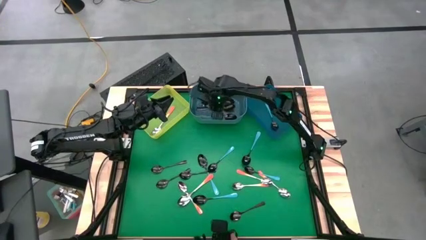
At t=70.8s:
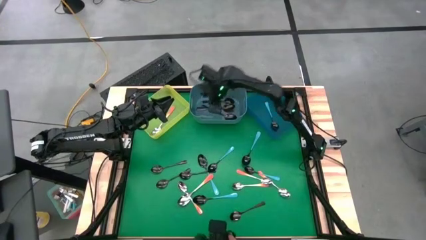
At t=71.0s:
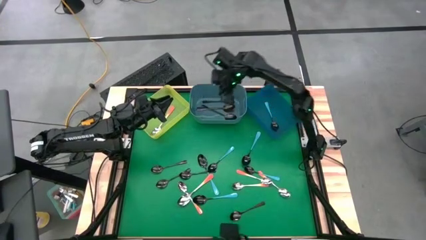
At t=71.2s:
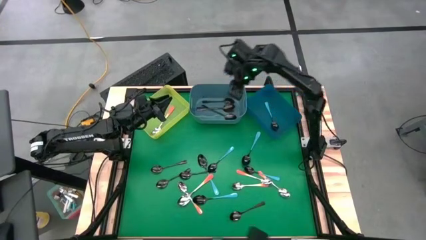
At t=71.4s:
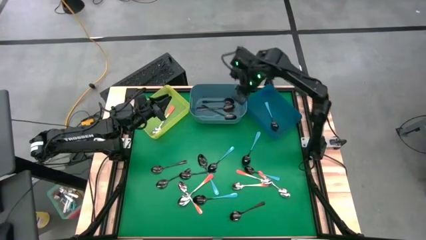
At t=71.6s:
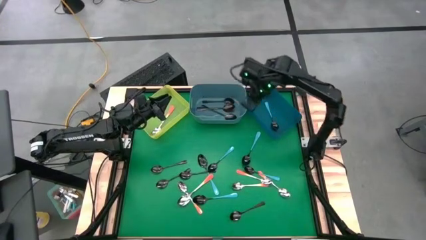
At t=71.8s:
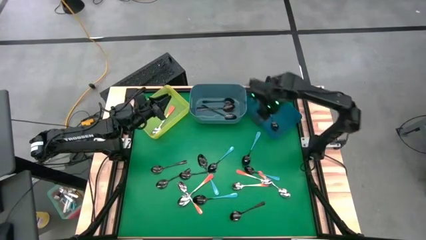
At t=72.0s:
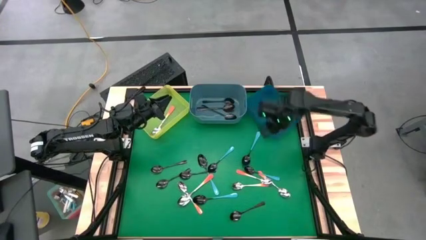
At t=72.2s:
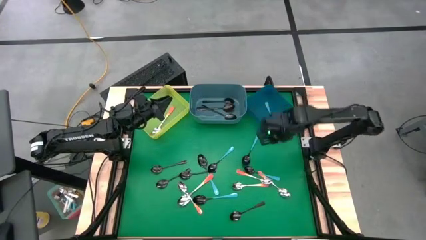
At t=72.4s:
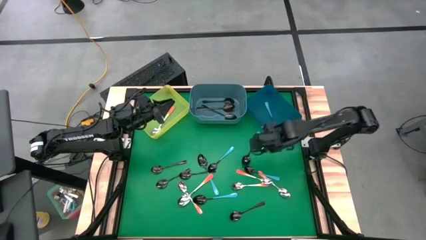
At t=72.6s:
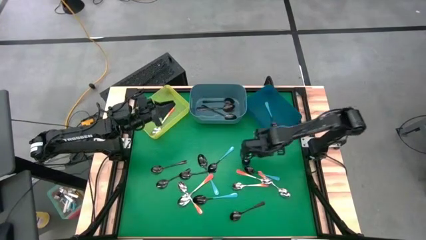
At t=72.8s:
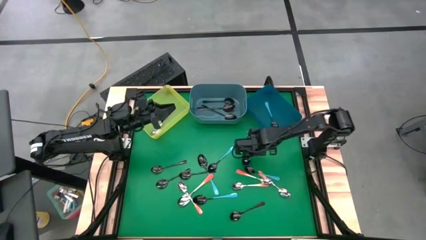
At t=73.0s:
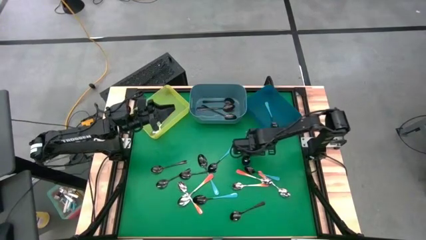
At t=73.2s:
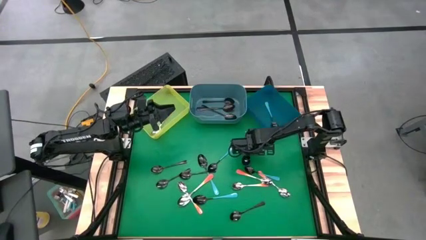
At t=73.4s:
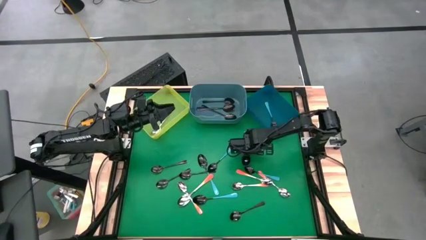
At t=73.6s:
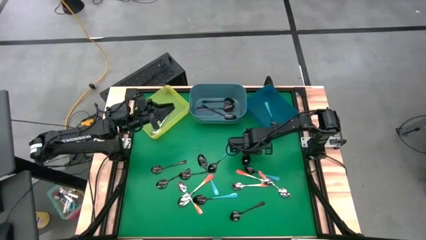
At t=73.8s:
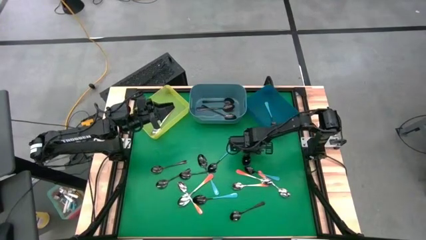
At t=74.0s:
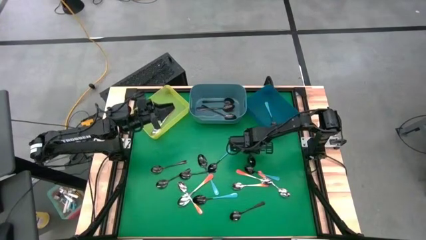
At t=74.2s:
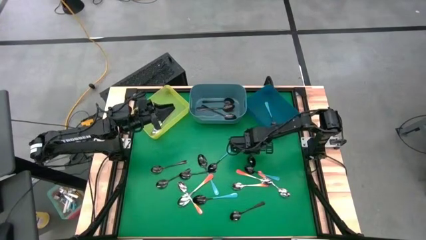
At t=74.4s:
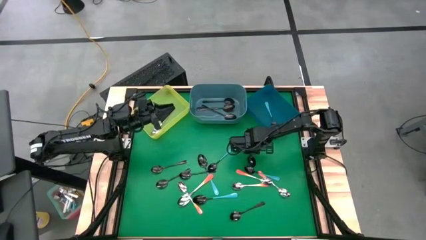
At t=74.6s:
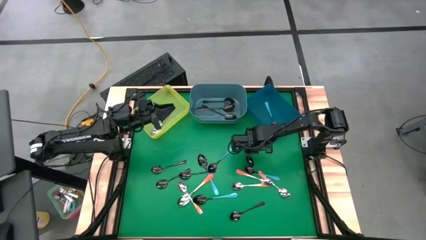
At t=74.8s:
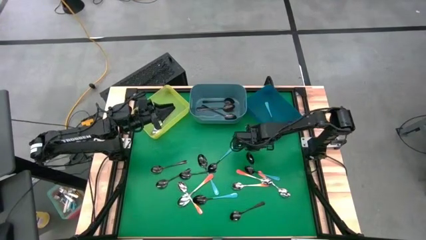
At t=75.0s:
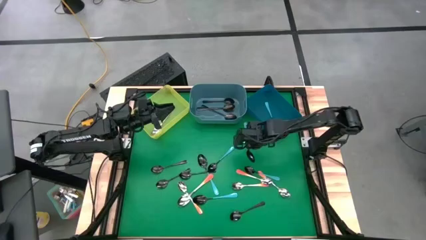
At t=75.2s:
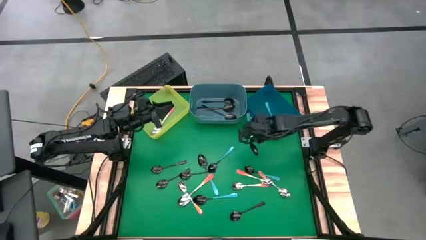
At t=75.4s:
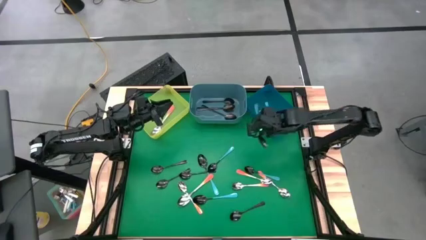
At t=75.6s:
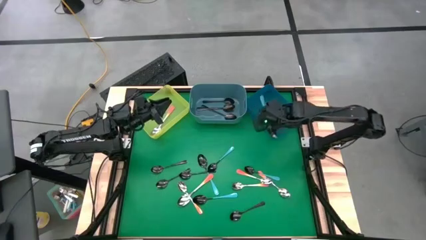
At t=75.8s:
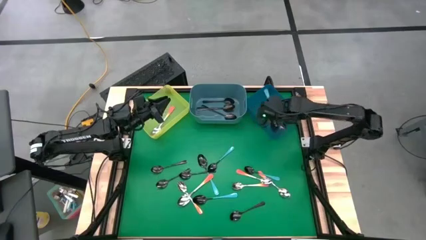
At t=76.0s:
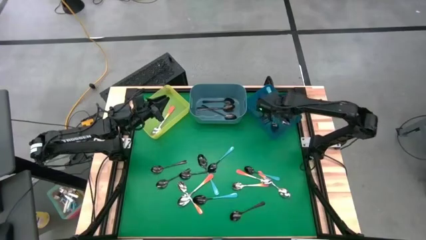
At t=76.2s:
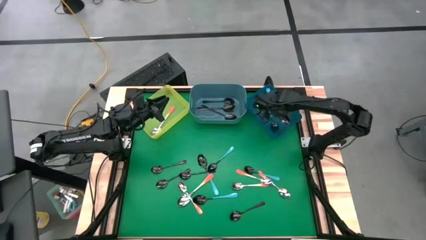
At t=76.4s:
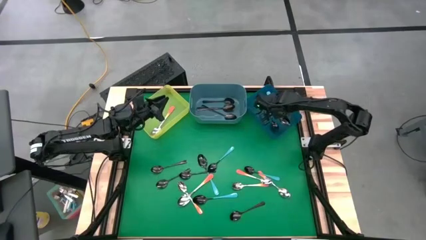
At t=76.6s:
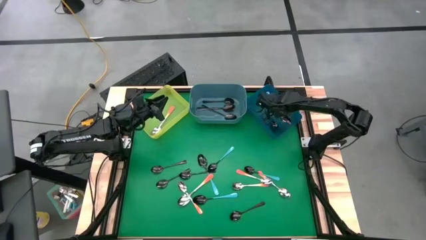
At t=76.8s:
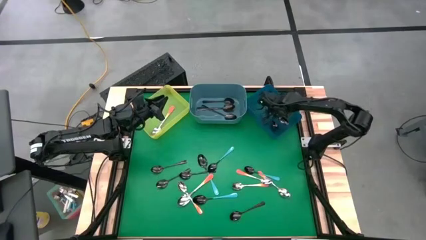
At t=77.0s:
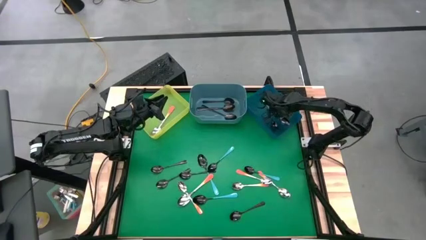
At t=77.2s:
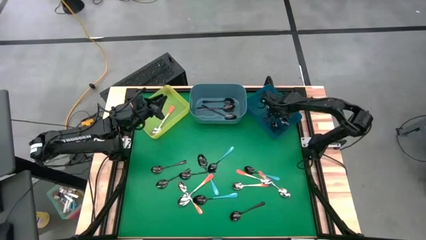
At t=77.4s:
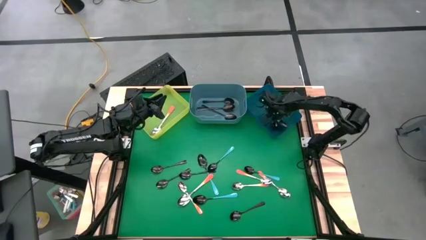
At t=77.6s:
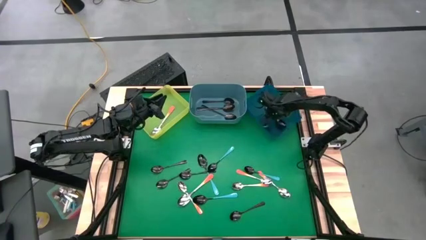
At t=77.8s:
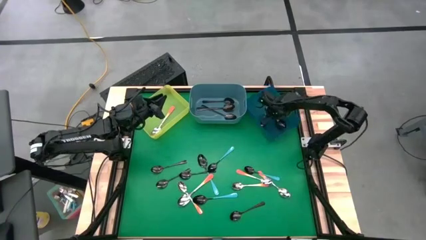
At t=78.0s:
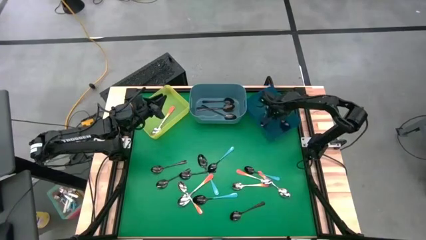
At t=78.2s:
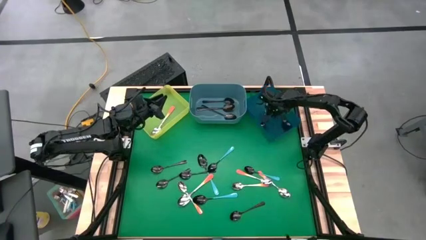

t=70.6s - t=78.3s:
Task: Sort silverware by color (type)
Put the blue spoon into the blue bin

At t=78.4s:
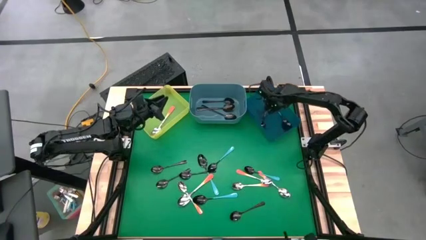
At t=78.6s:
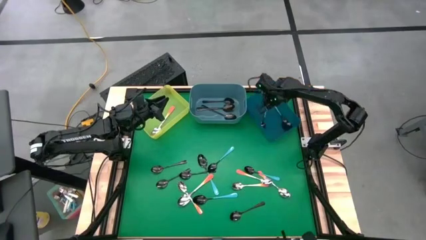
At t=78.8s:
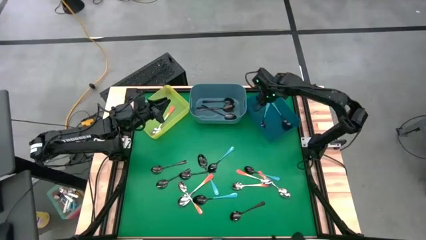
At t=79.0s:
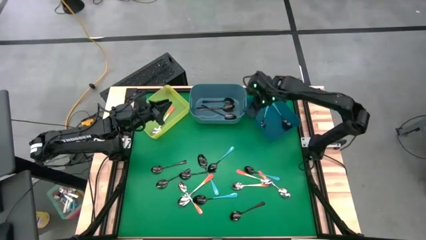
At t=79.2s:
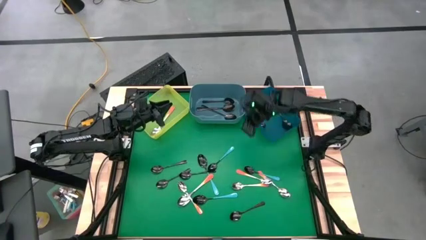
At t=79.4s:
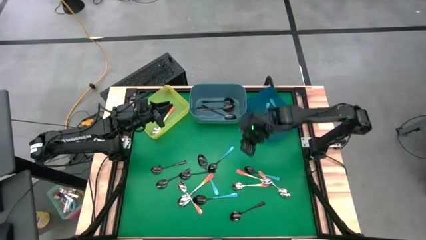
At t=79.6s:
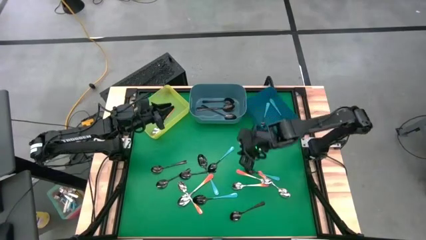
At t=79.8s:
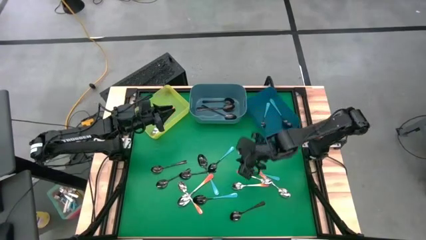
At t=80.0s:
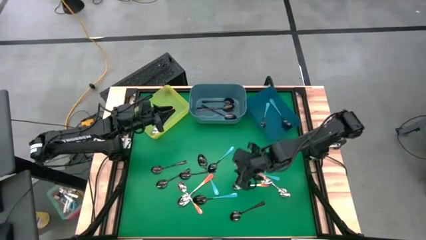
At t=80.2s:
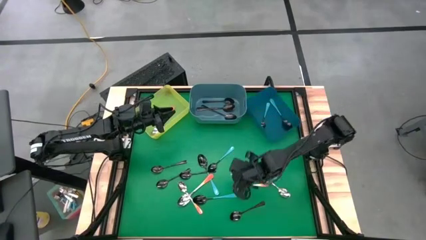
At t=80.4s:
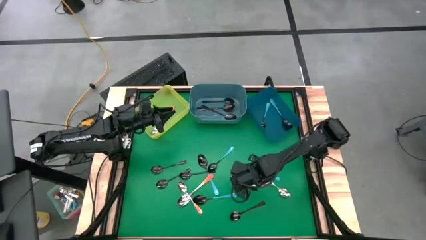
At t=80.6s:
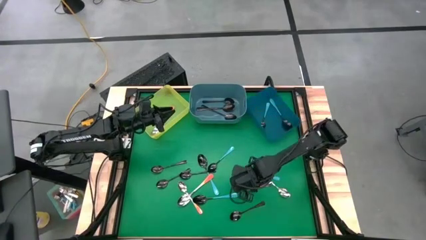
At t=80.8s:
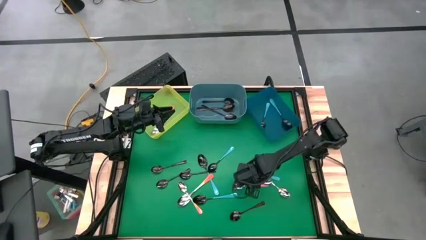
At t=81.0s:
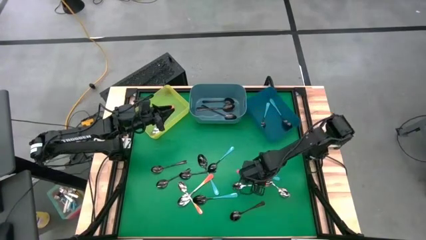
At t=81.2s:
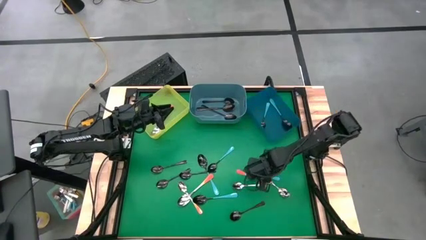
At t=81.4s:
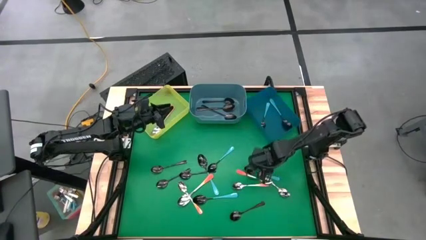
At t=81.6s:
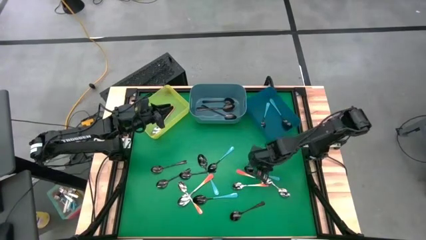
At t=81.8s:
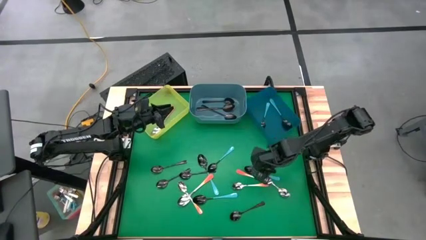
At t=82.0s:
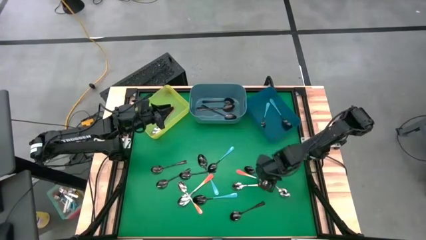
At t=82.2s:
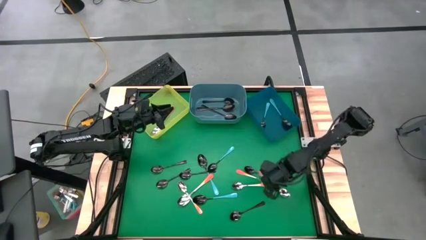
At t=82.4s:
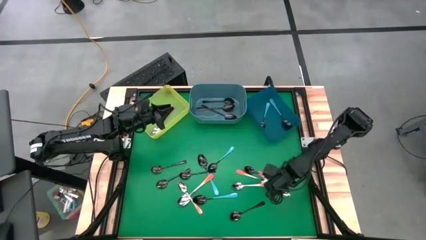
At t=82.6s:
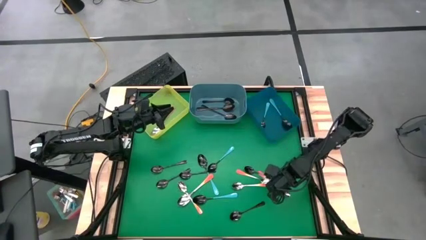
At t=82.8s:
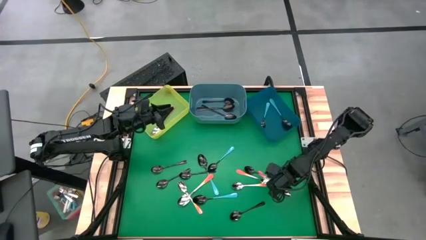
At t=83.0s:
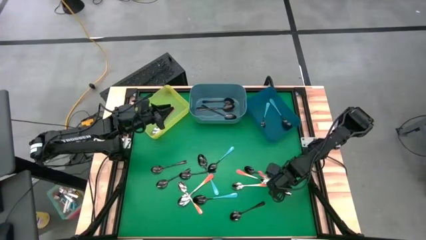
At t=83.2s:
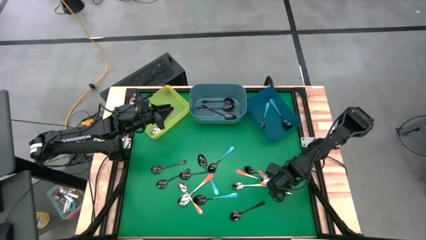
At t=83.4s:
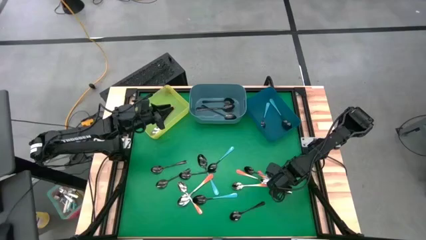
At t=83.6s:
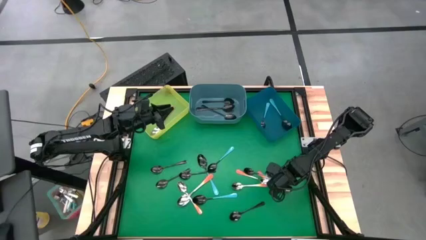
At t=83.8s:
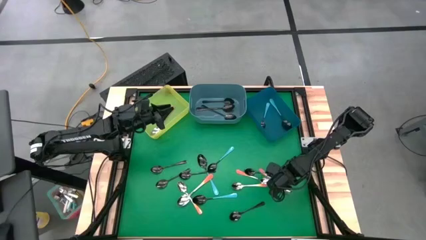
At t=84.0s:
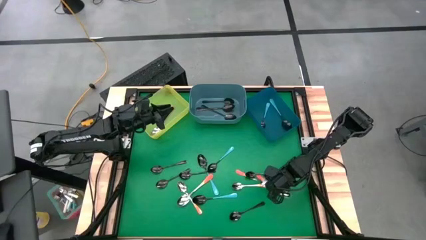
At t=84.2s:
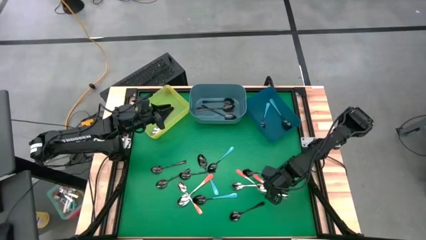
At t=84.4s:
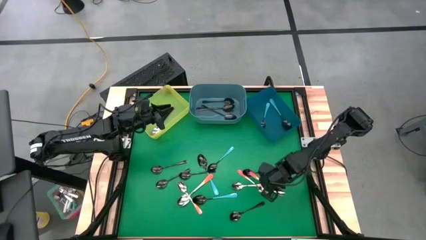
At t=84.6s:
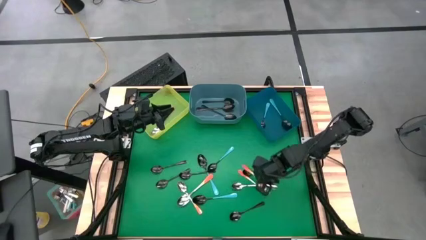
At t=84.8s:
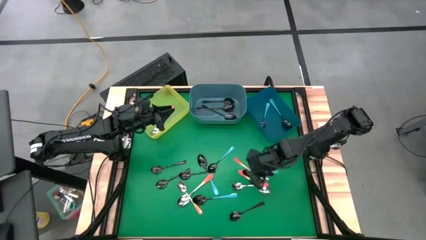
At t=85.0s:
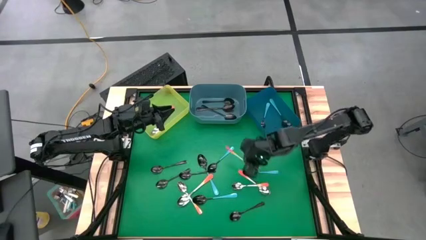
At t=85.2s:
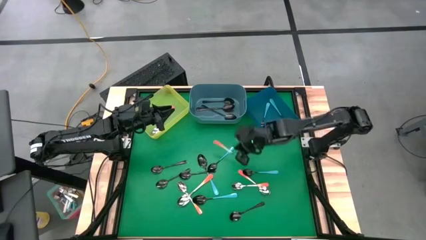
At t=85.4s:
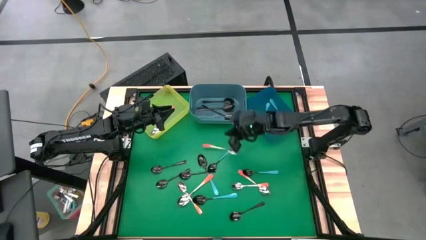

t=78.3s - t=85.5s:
Put the orange spoon into the yellow bin
